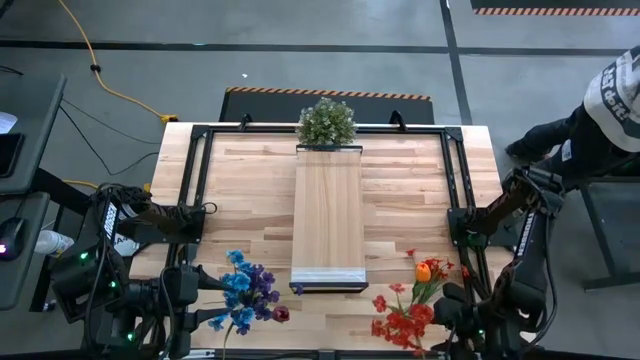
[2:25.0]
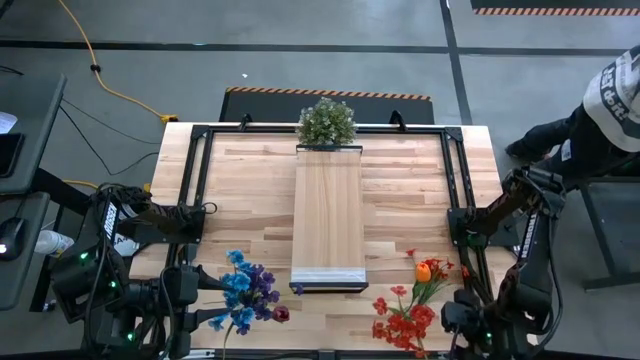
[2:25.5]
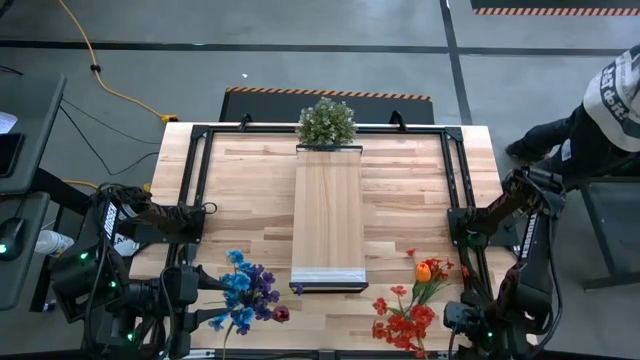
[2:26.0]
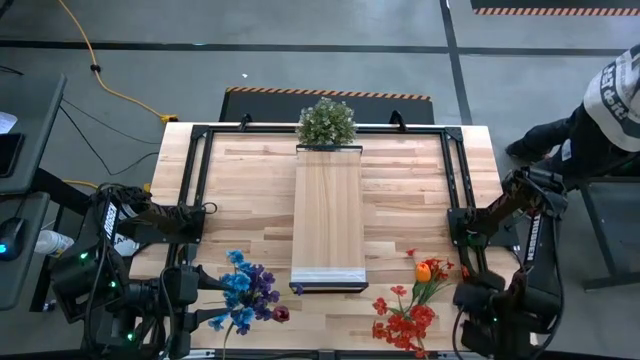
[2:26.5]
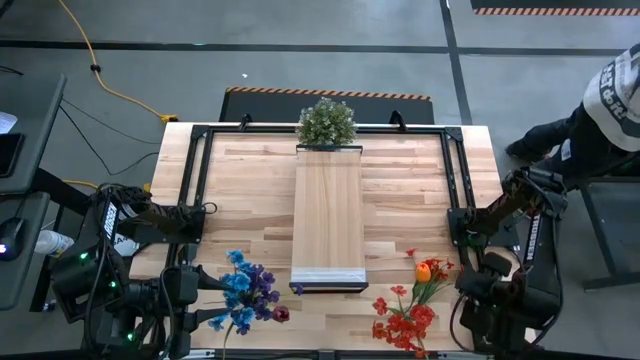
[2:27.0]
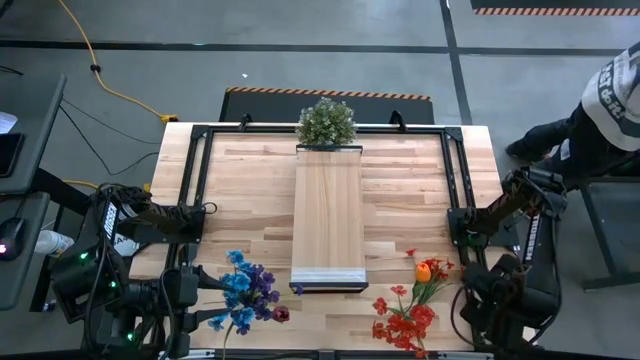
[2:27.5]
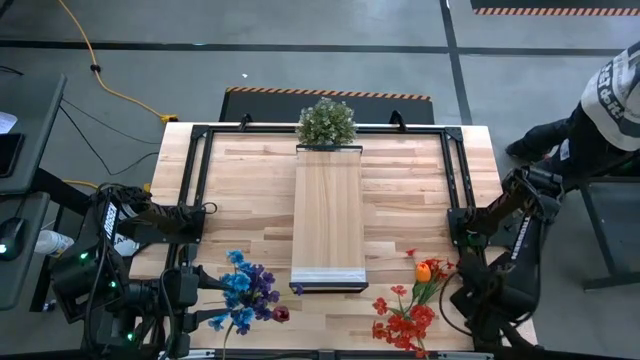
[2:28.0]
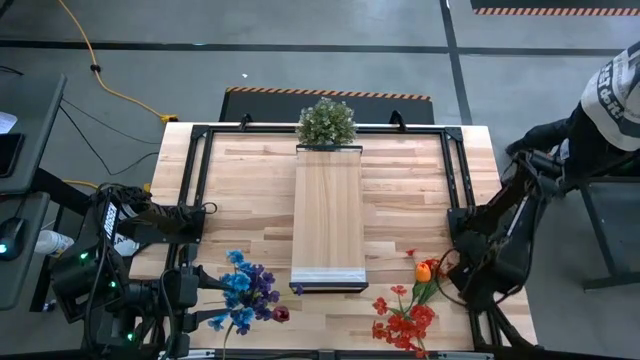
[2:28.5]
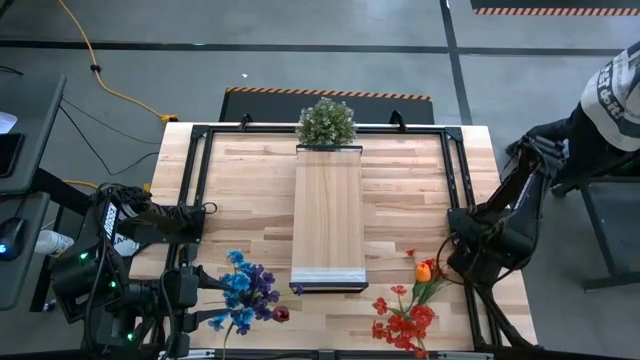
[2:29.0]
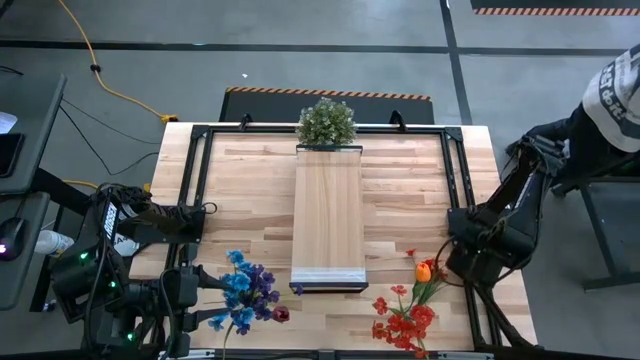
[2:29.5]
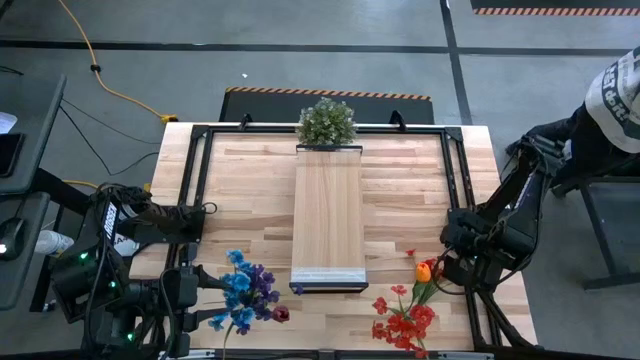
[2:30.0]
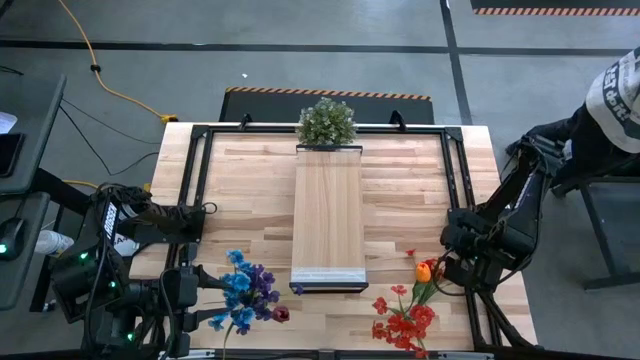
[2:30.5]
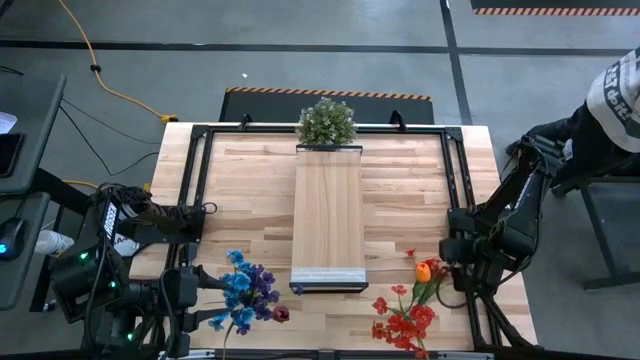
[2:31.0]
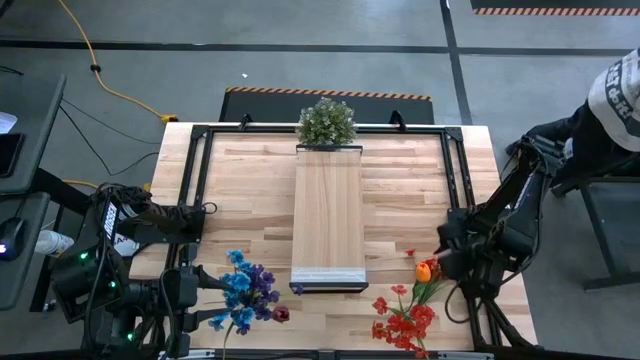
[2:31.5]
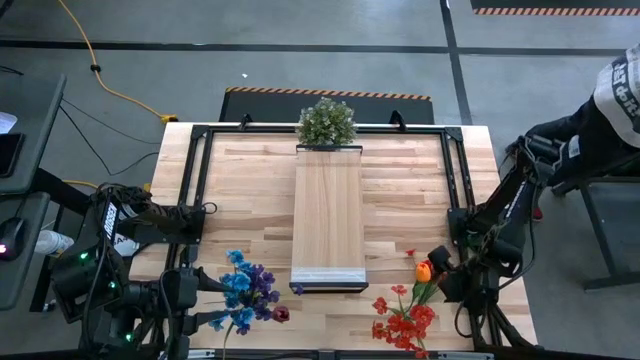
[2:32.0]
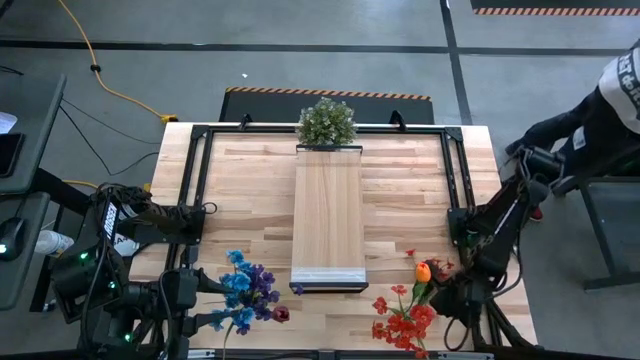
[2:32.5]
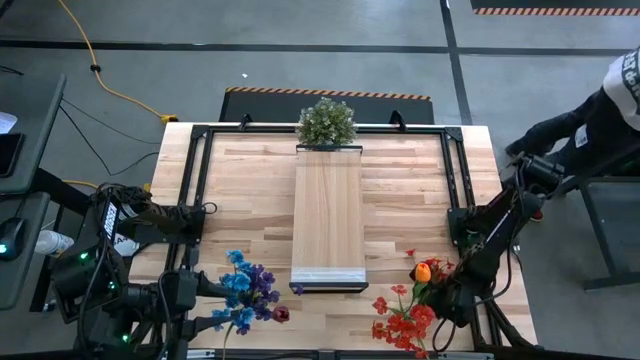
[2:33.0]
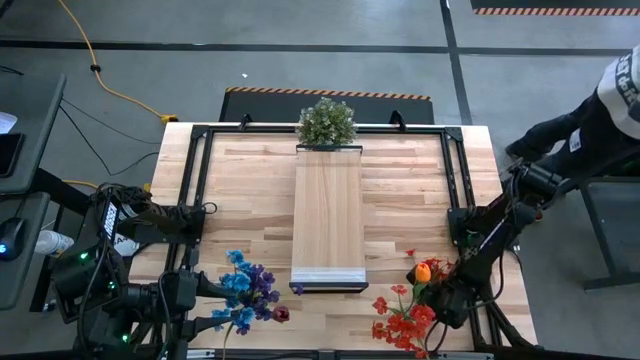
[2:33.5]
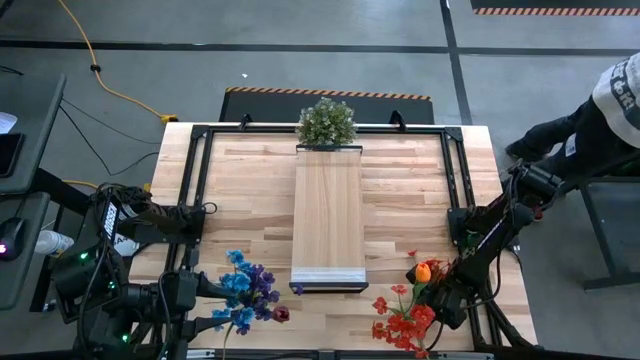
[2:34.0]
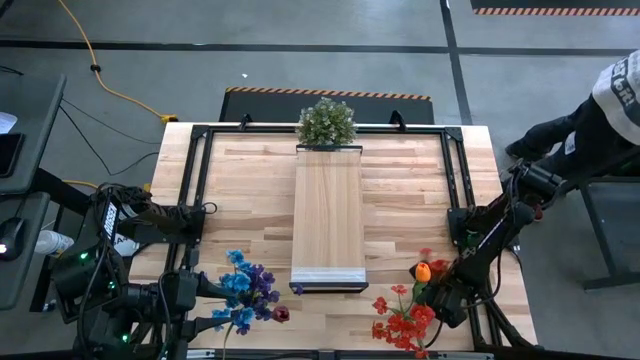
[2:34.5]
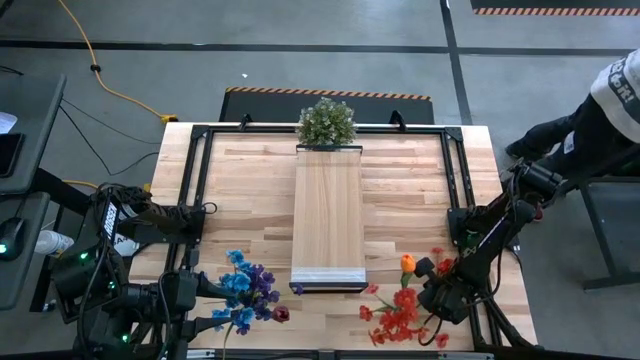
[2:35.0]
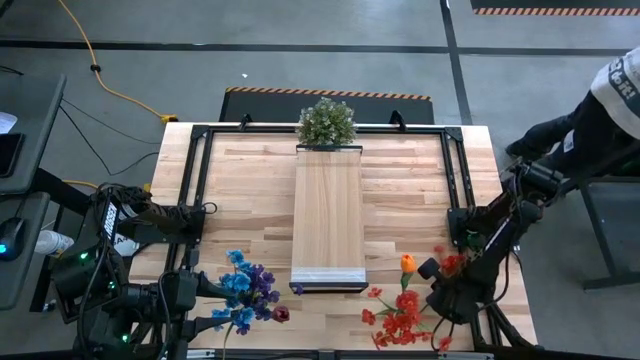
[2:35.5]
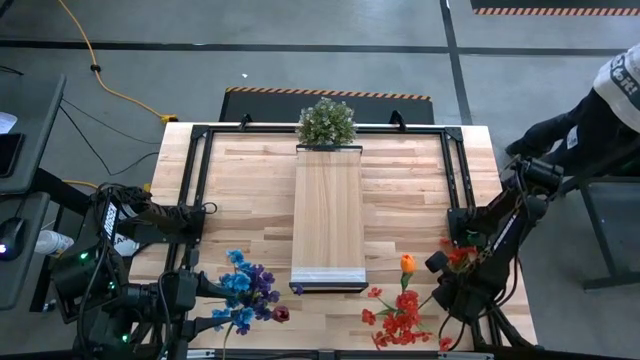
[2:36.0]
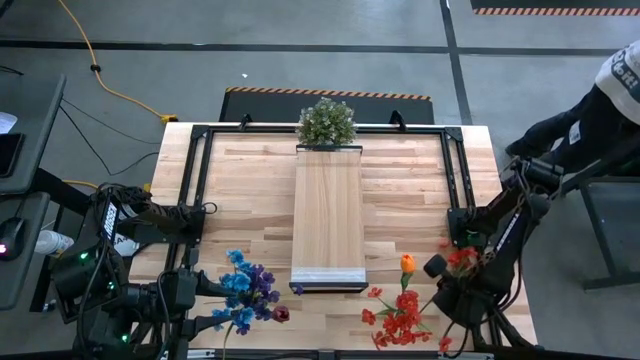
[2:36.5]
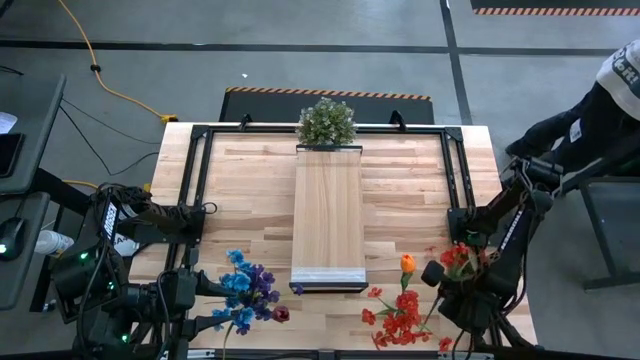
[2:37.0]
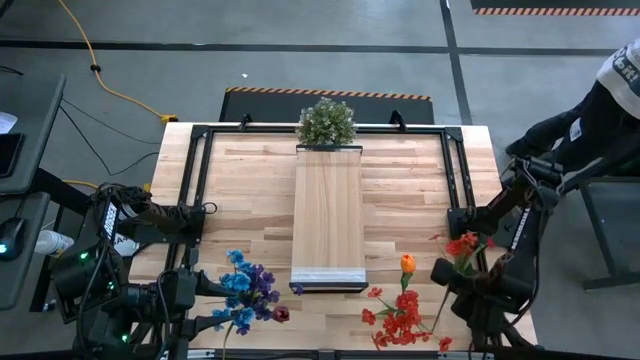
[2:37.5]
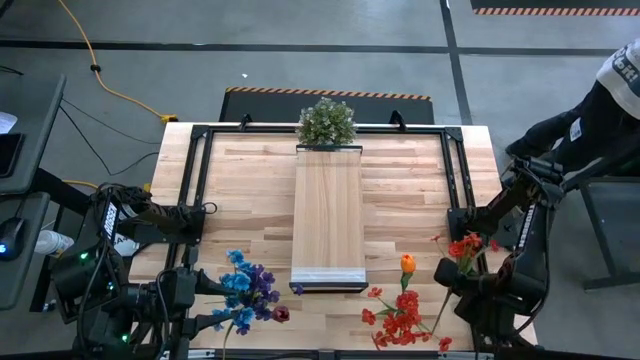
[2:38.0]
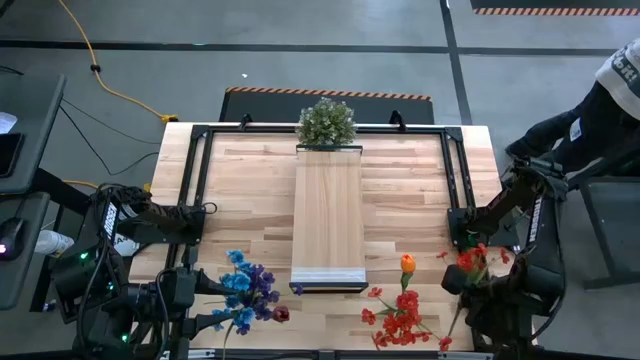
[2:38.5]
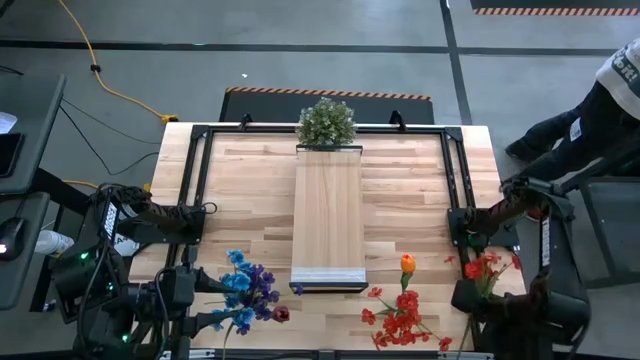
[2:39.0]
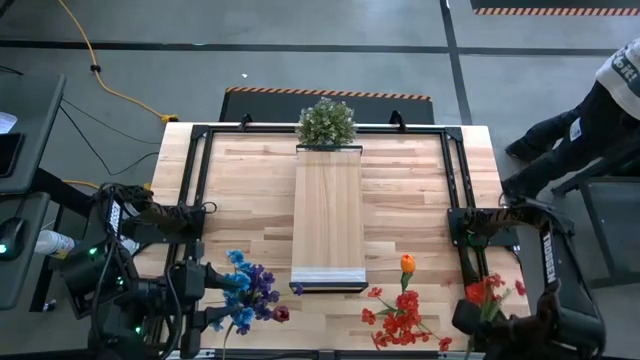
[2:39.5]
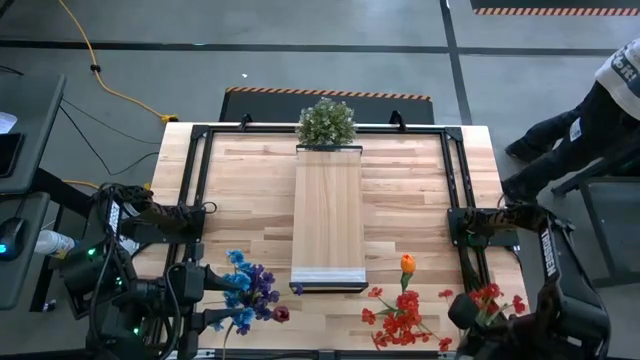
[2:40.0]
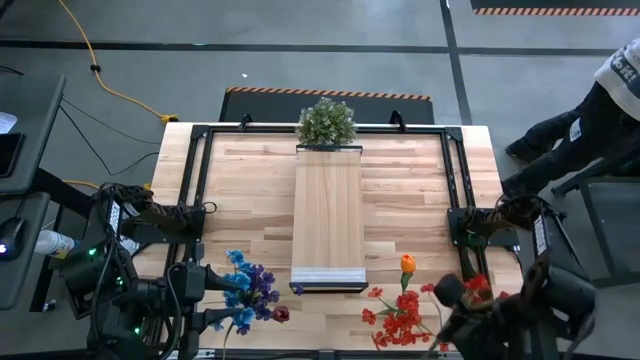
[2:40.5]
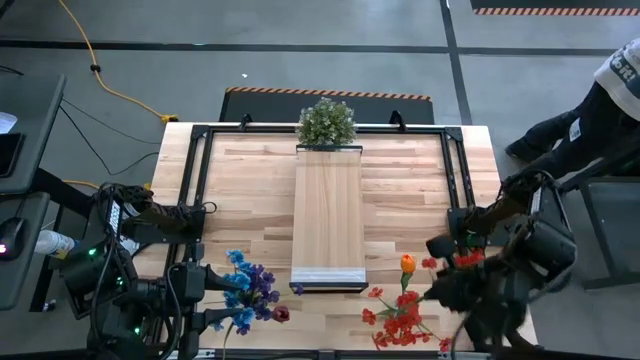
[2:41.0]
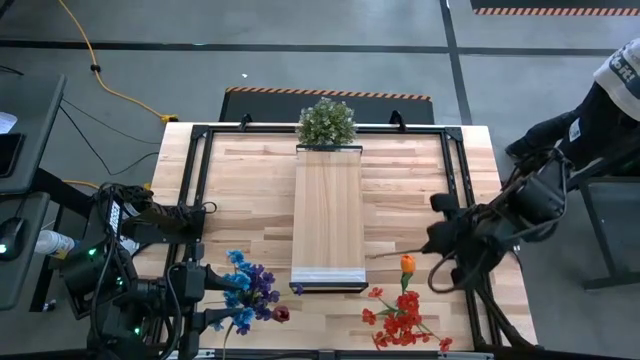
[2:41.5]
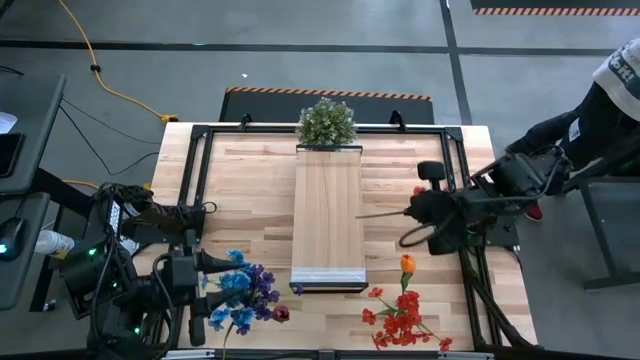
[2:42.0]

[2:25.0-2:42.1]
Task: Pick and place flowers into a vace then onto a shelf
Put the red flowers into the right transparent vase

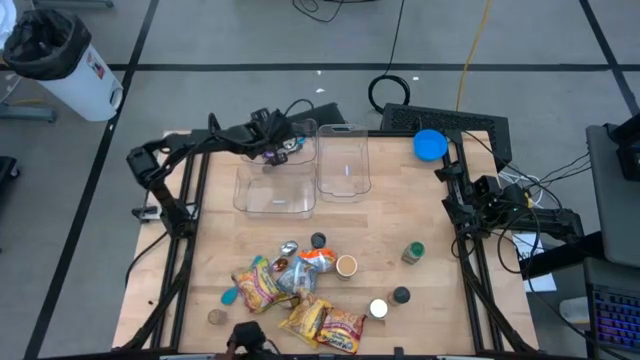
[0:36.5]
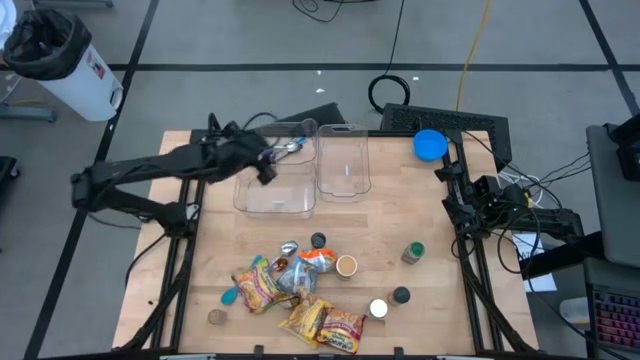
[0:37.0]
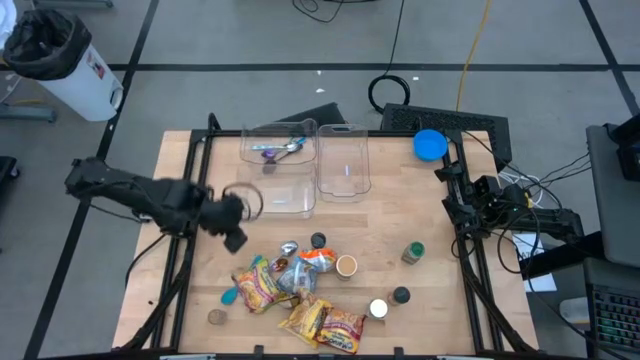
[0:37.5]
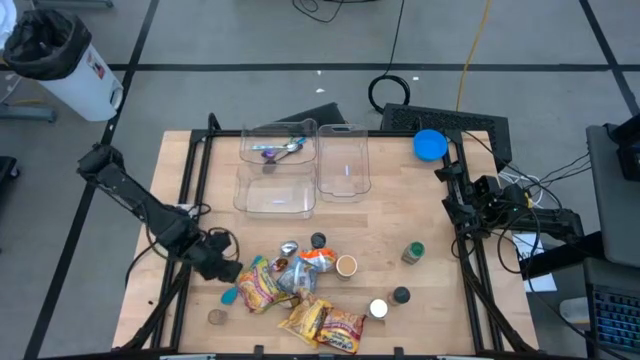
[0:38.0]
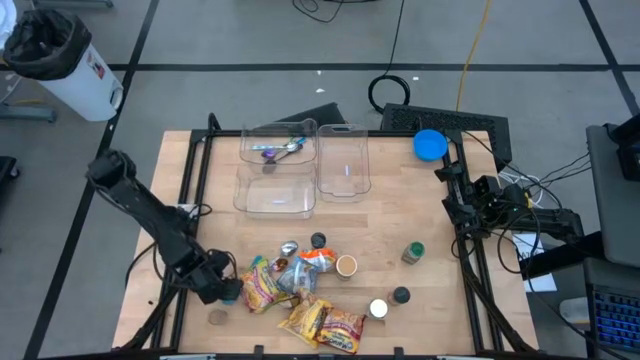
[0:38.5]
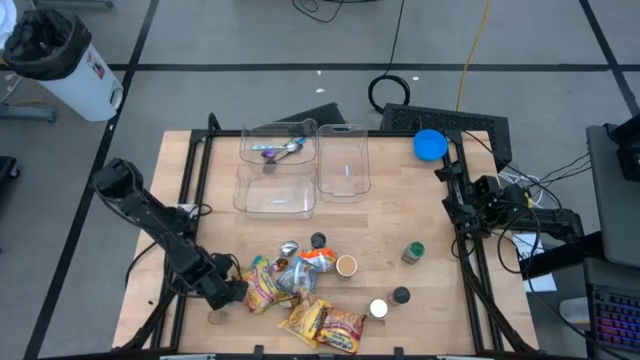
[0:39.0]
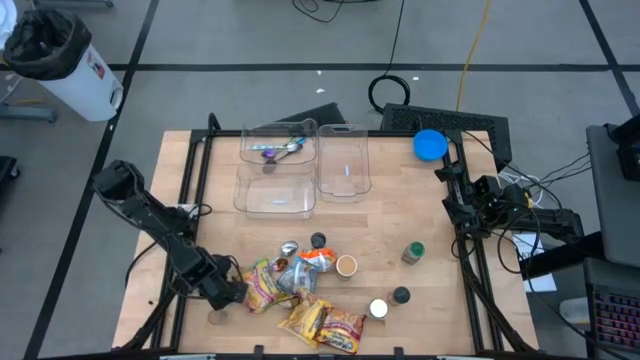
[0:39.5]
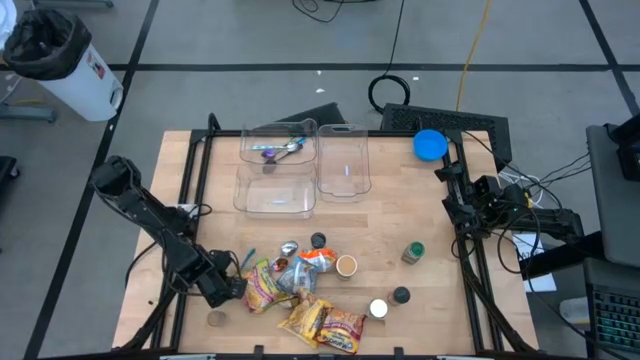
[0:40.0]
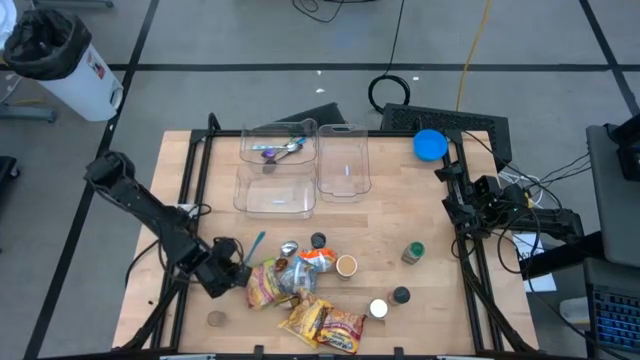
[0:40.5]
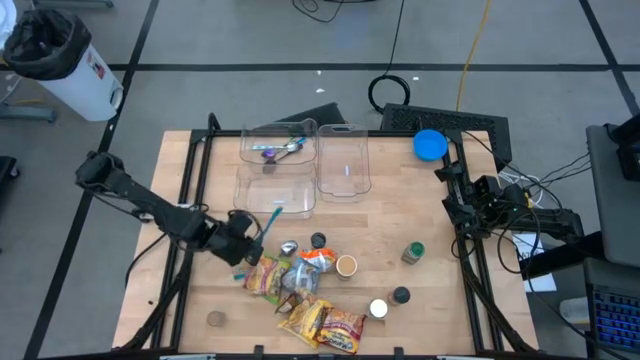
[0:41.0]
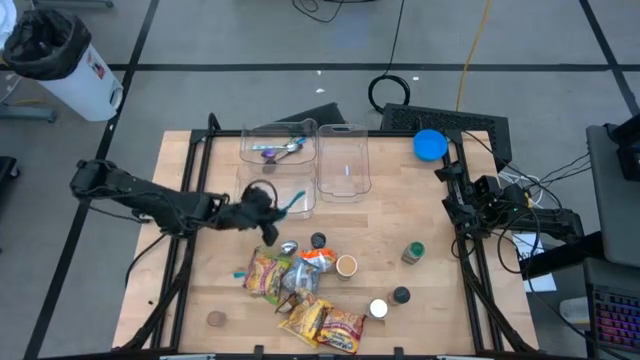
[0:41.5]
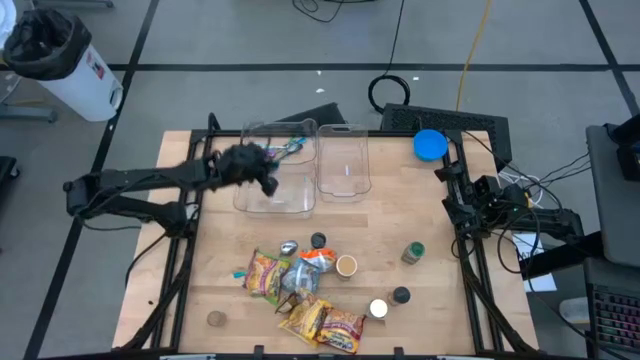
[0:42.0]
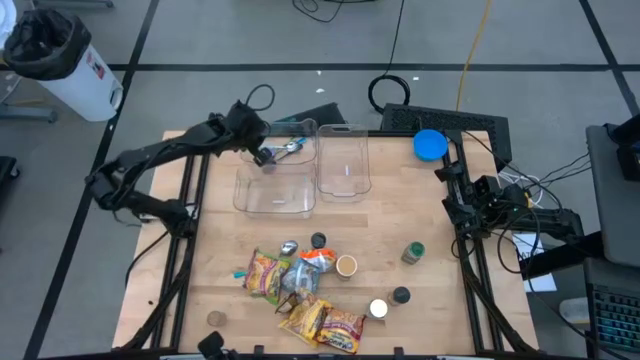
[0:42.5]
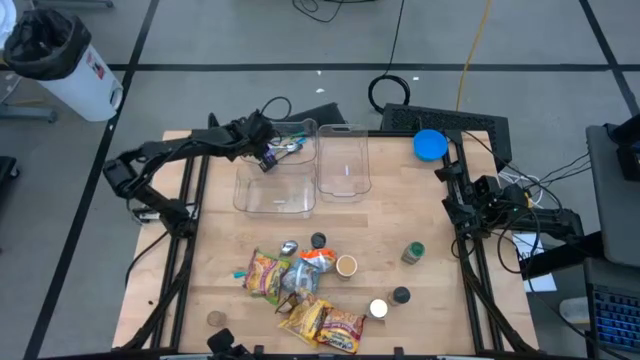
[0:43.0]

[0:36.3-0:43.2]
Task: Pick & Place Food Item
Put the blue baby spoon into the top left transparent bin
